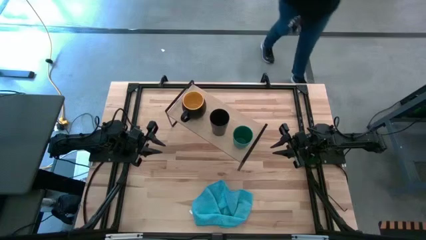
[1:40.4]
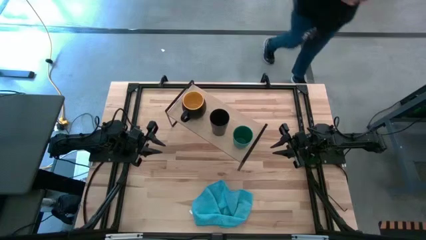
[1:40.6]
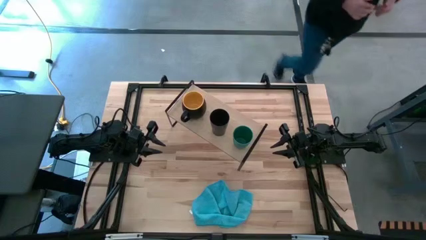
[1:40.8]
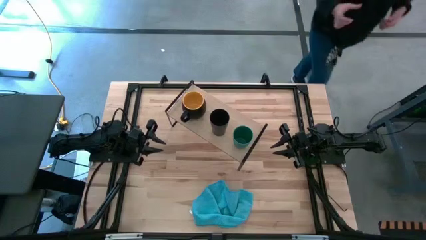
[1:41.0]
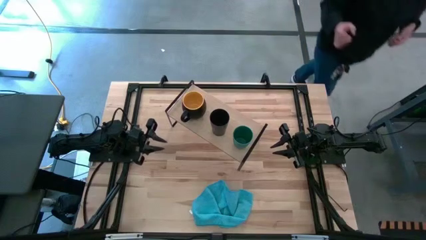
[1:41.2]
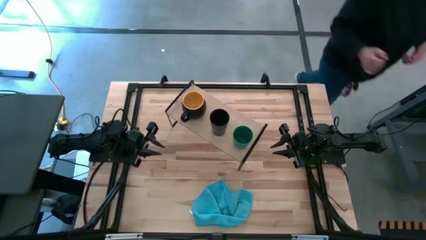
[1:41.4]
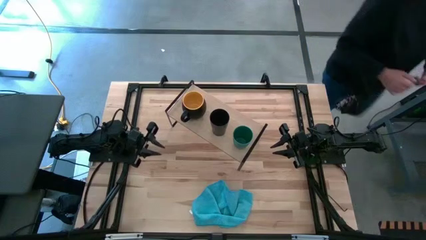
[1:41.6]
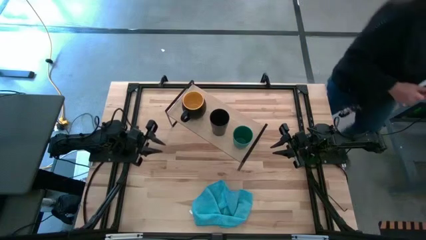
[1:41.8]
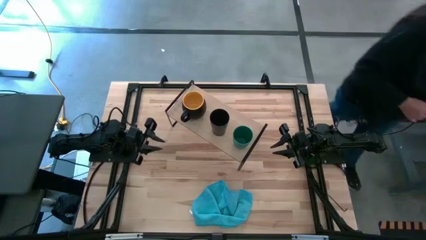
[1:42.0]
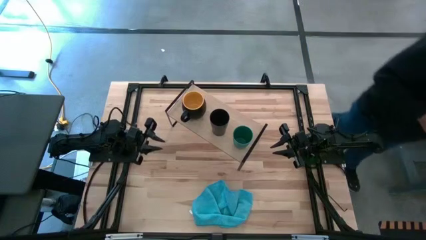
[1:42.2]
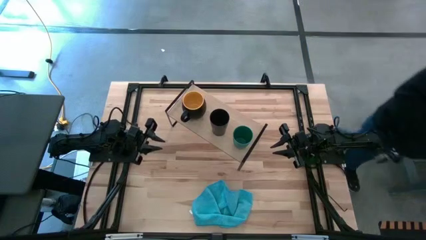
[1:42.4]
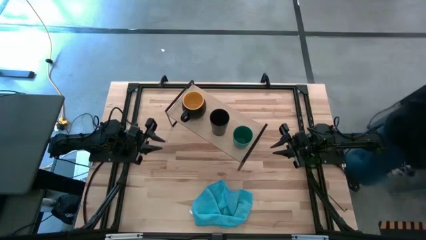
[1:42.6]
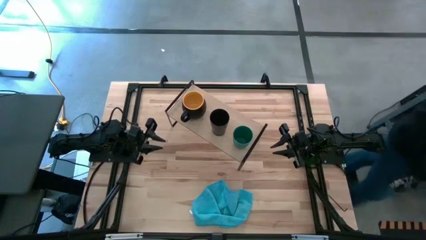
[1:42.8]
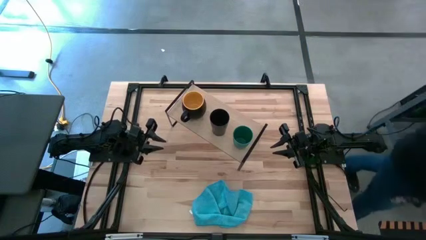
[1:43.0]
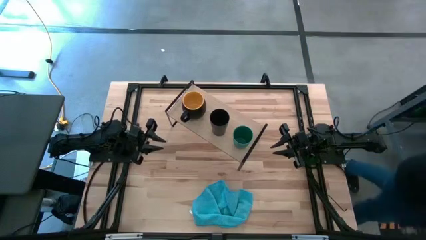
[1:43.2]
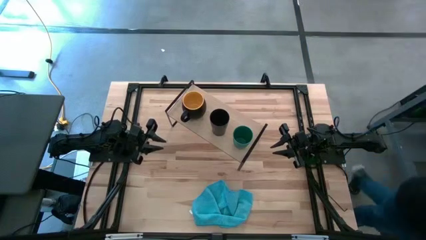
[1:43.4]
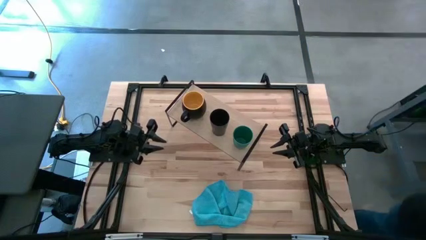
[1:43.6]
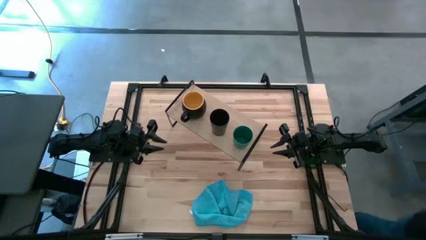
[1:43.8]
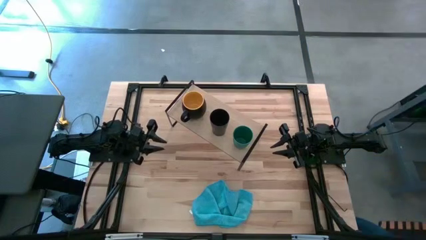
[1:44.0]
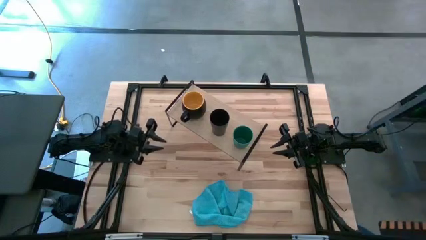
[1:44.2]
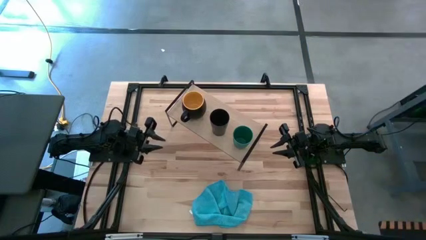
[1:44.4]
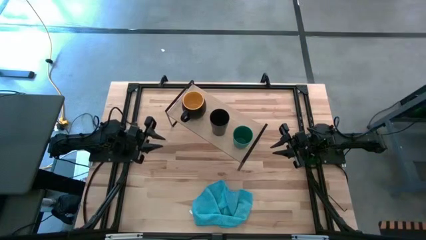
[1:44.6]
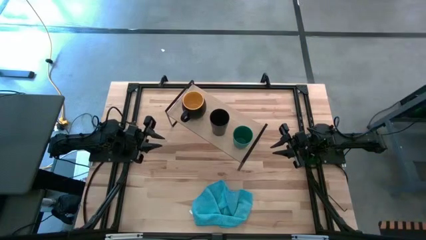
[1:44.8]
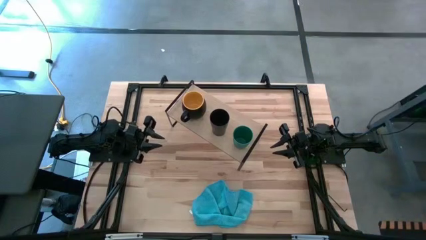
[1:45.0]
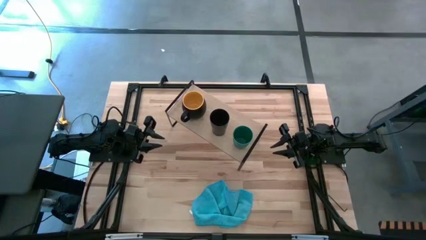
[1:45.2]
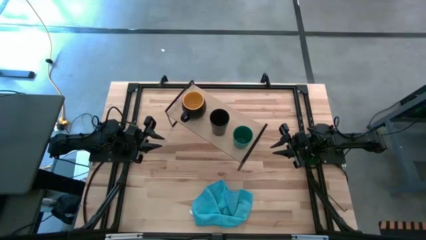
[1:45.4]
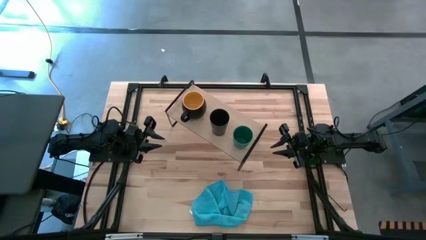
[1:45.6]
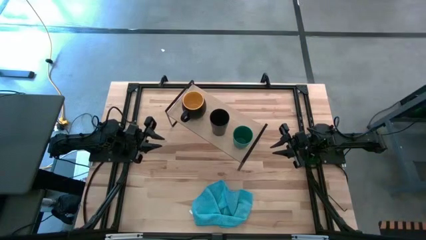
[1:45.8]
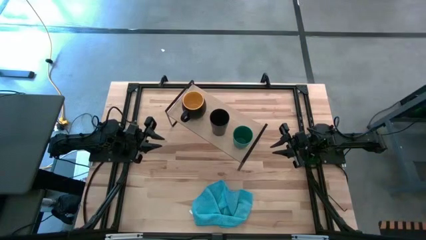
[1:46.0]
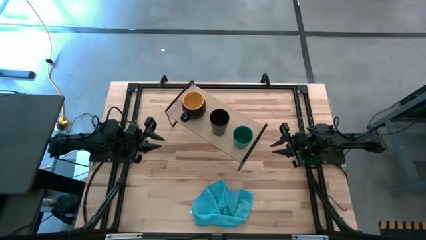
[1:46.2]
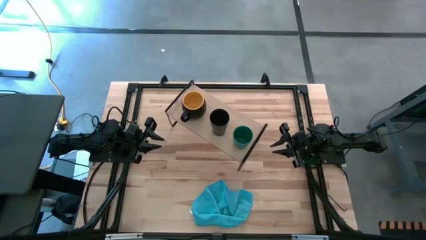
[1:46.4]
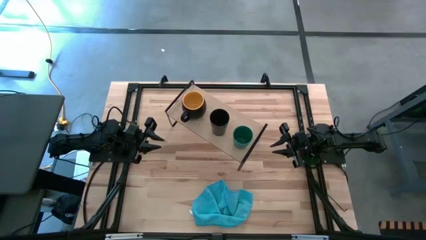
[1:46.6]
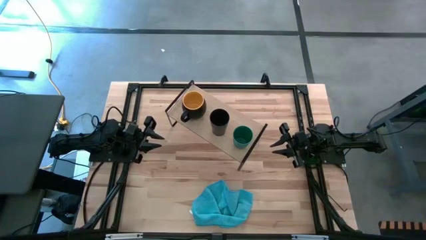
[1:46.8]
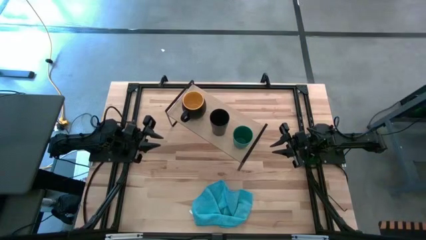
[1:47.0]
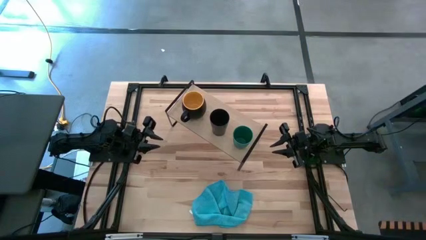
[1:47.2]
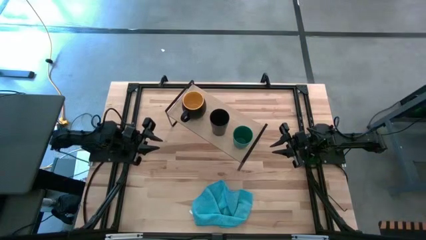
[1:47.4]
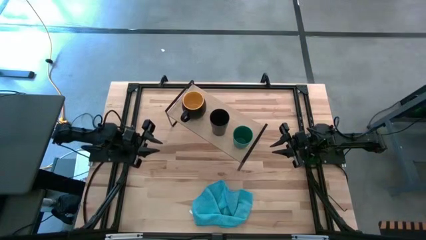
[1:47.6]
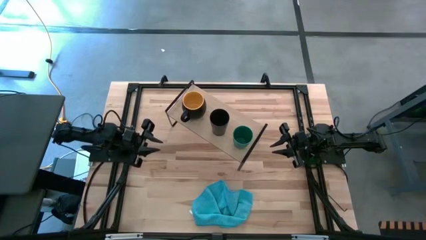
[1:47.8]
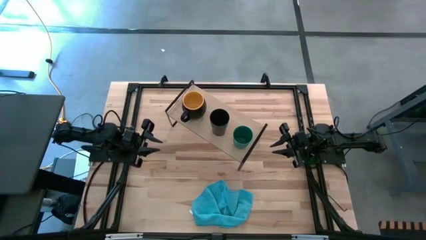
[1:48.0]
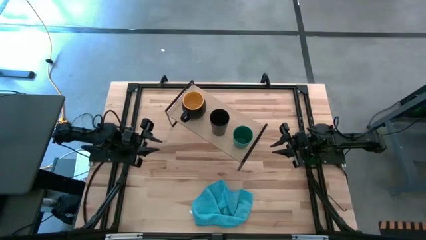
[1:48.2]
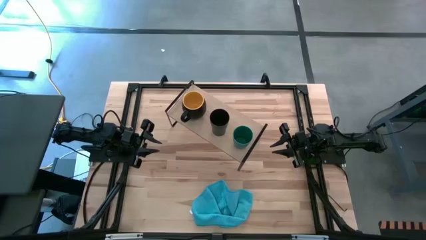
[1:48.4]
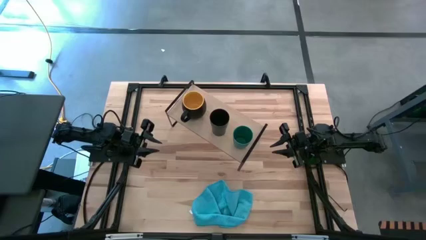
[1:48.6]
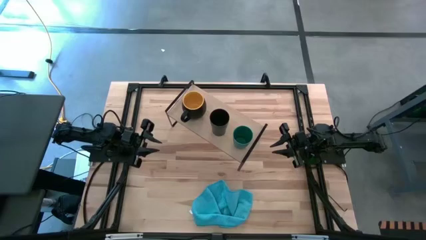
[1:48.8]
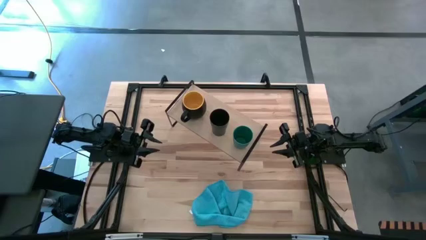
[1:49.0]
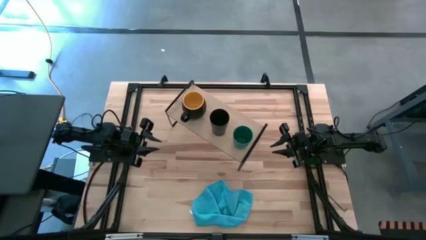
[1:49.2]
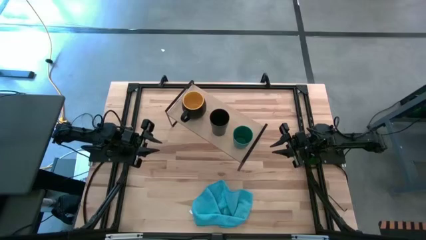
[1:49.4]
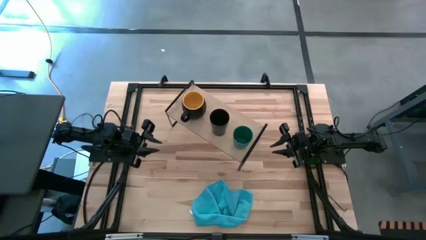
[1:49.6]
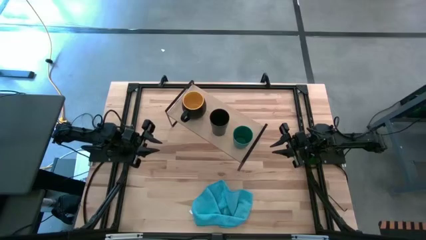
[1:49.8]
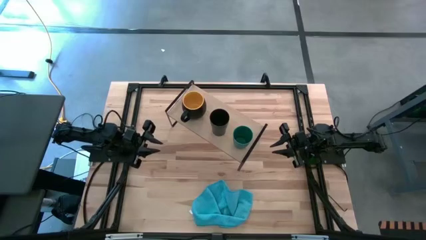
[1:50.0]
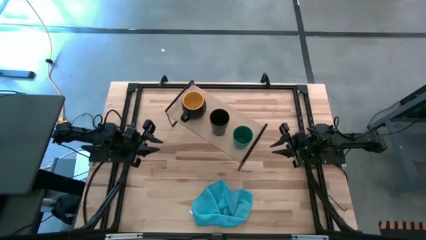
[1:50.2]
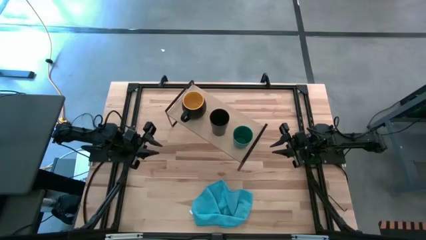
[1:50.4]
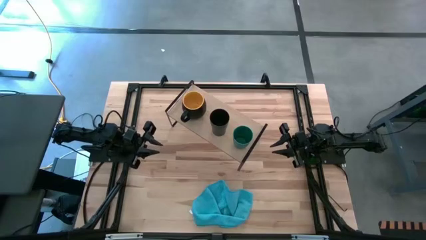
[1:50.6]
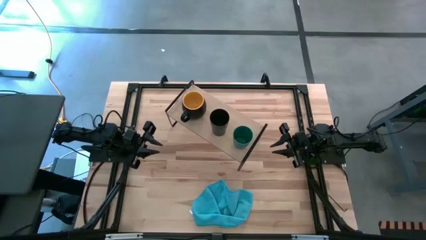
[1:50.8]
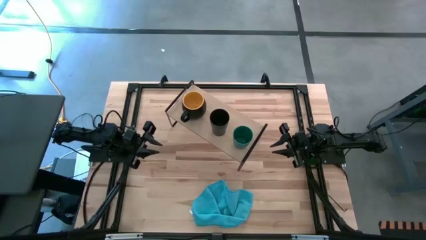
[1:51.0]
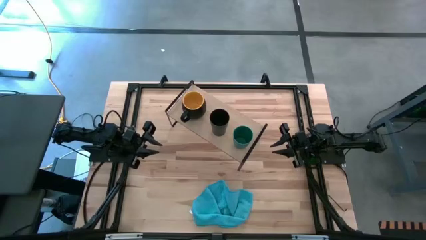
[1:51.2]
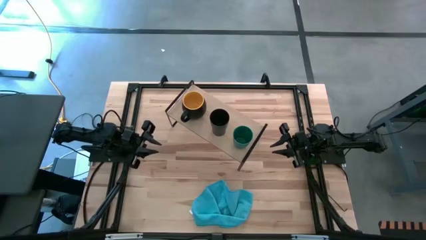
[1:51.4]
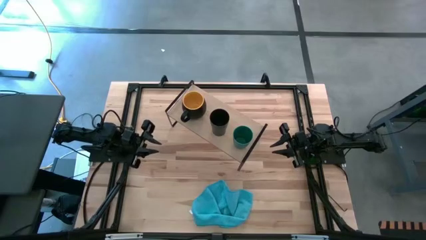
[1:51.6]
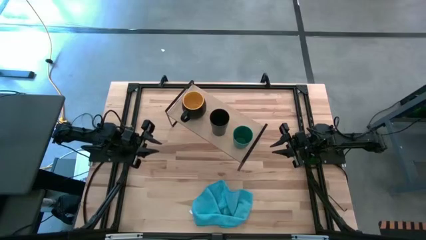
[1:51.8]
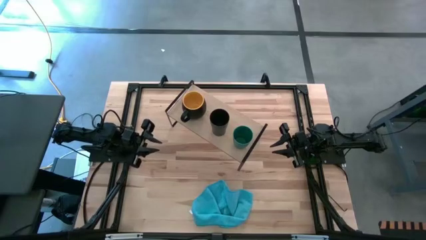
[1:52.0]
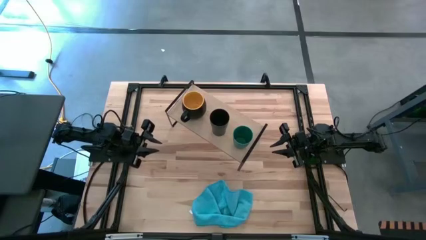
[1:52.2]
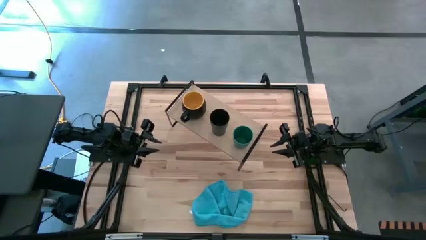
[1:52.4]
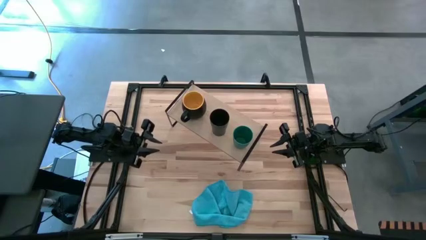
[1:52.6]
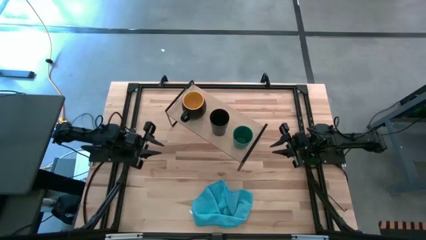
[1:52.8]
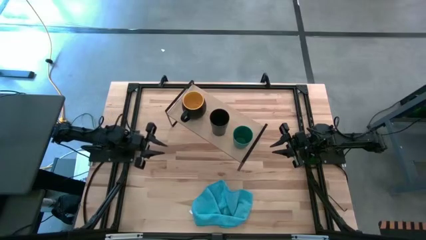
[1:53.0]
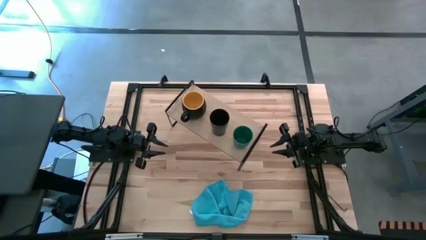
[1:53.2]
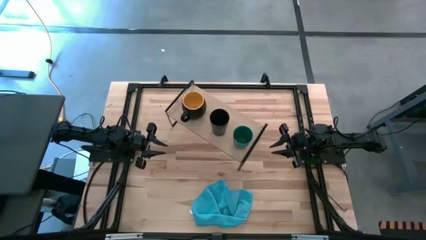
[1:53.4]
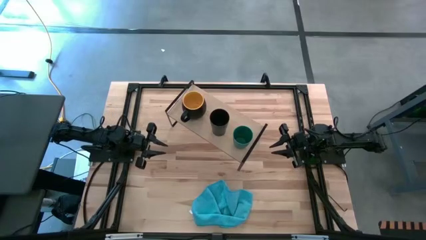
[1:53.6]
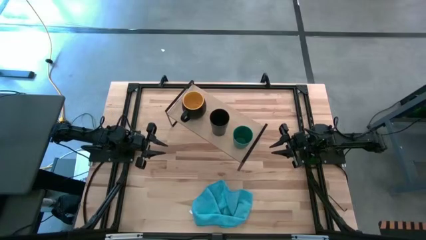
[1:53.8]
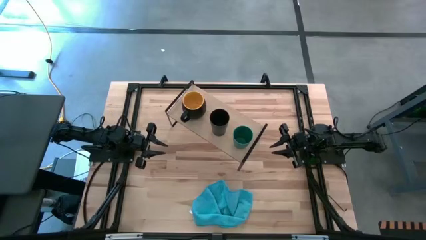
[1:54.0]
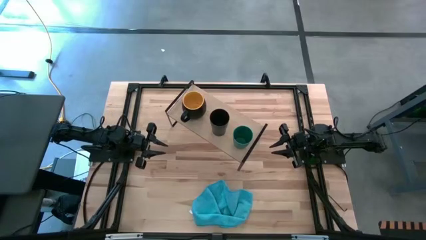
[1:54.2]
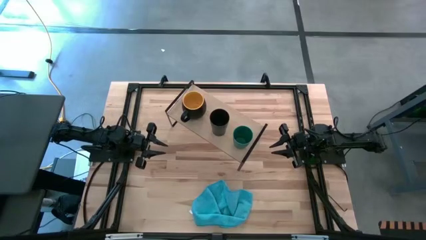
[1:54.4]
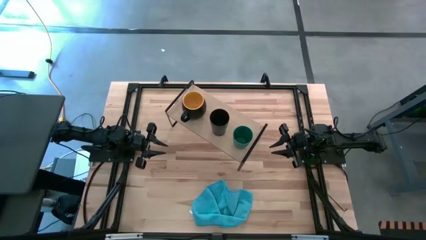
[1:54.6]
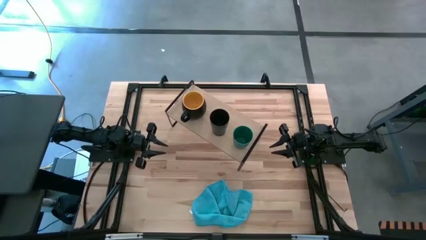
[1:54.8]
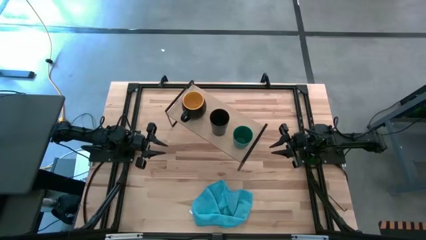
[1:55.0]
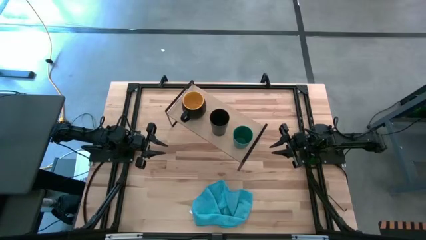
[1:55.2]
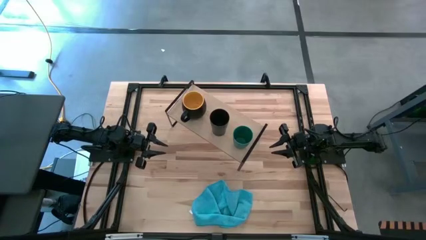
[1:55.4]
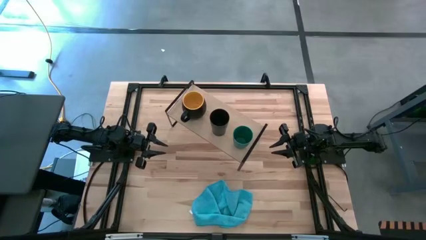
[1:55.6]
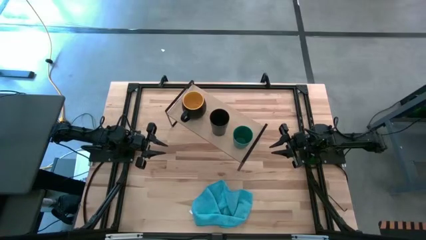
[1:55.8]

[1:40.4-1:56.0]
Task: Stack small to large cups/mugs on shelf
Return to home position

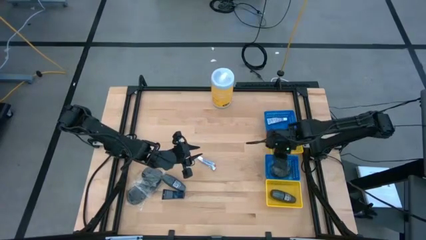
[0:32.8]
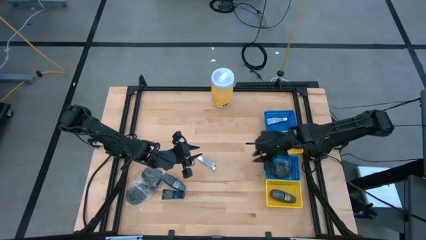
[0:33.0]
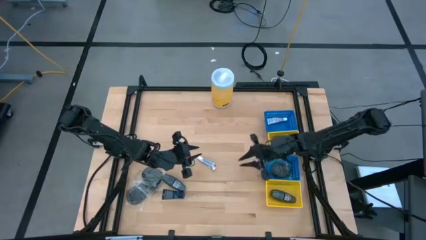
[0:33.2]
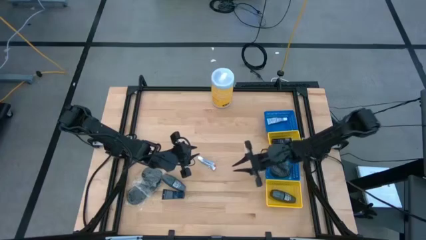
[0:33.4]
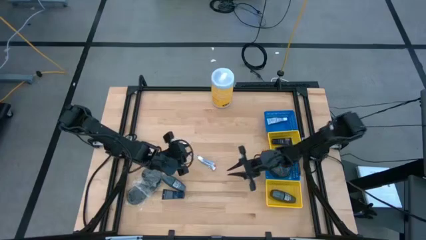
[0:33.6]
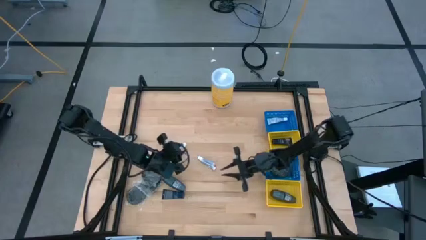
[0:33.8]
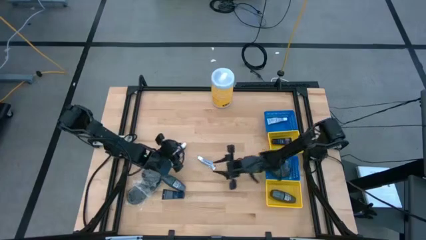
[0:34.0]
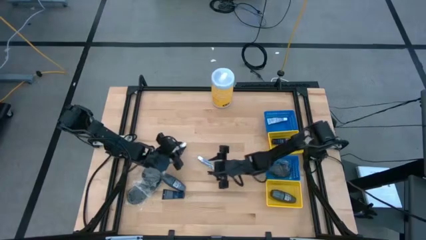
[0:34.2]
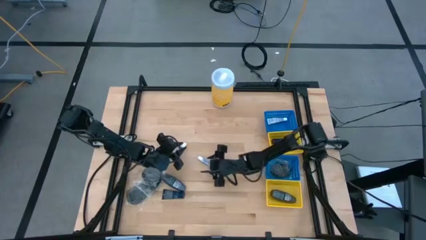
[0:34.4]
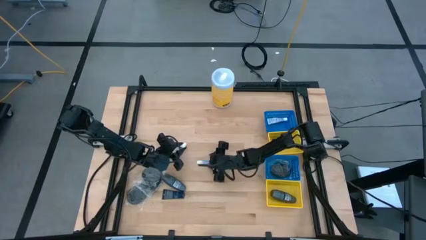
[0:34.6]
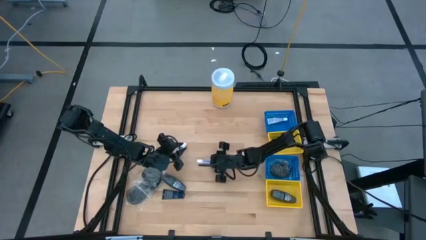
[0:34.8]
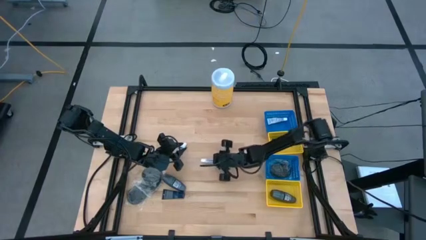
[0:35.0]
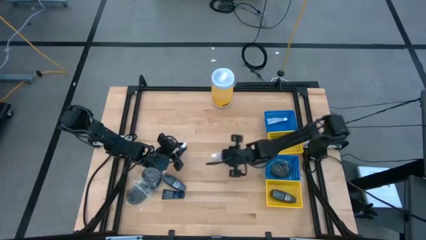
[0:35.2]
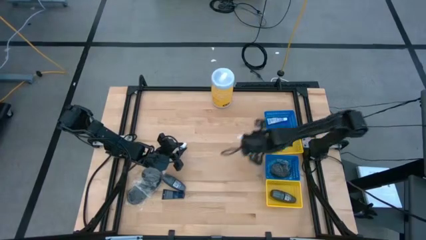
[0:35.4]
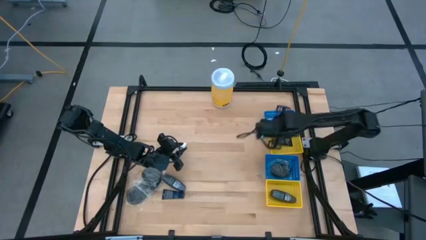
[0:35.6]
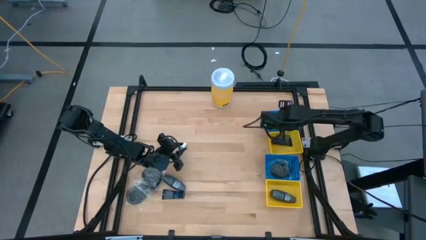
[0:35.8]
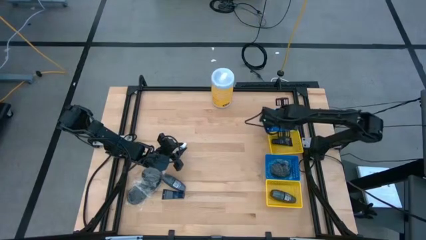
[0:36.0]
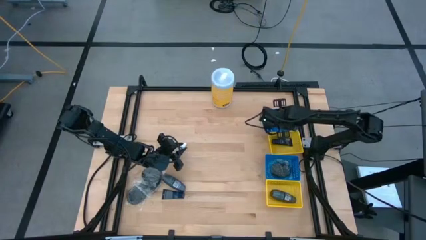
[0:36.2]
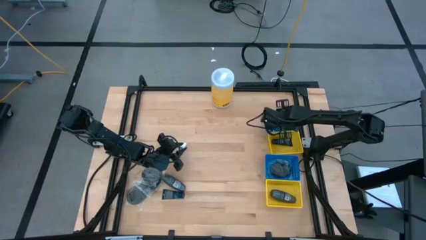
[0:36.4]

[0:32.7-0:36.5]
Task: Pick & Place Travel size toiletries
Put the white toothpaste into the top blue bin
